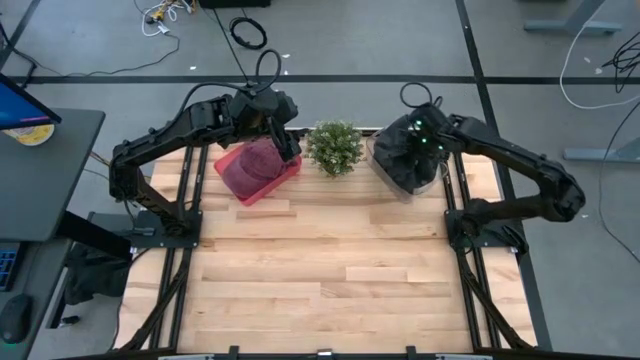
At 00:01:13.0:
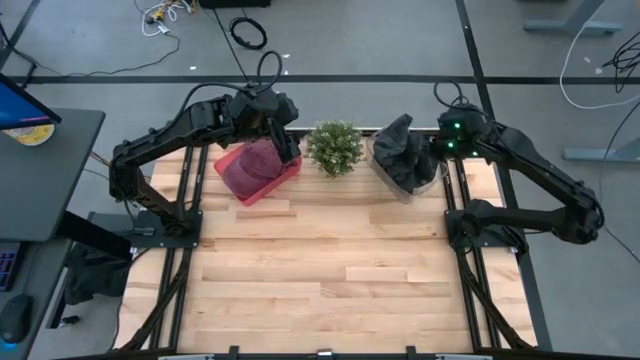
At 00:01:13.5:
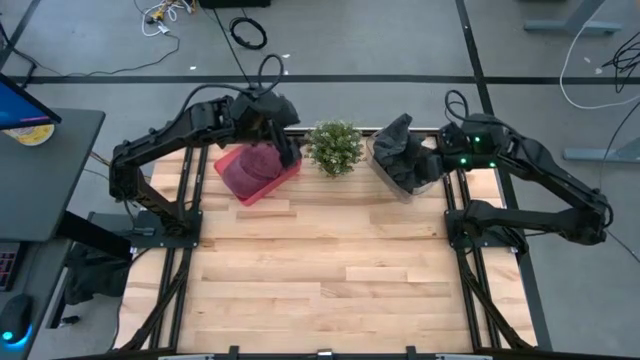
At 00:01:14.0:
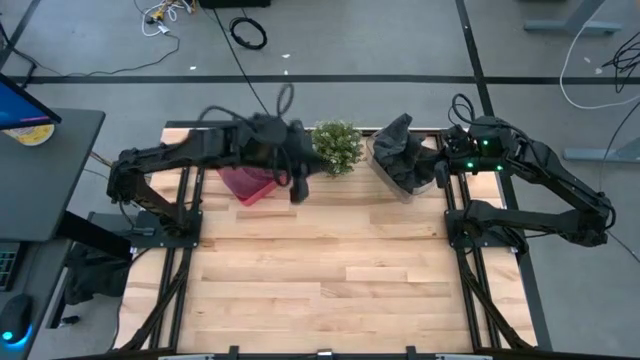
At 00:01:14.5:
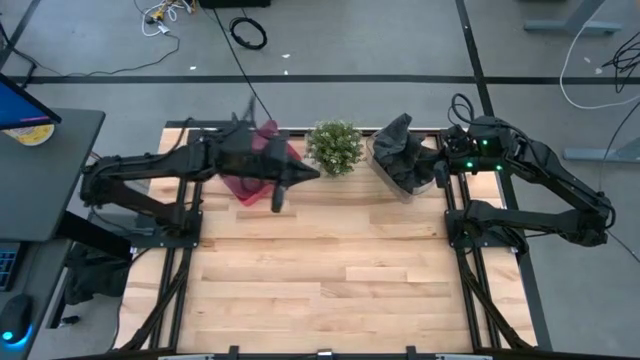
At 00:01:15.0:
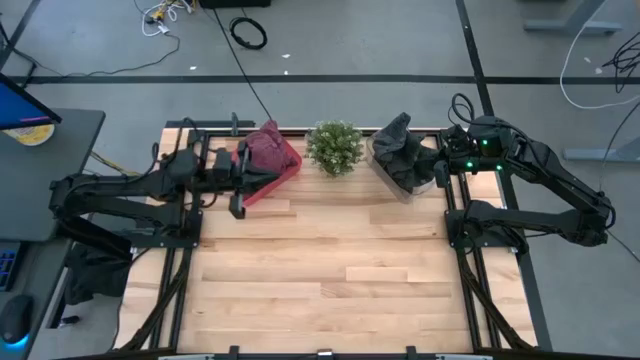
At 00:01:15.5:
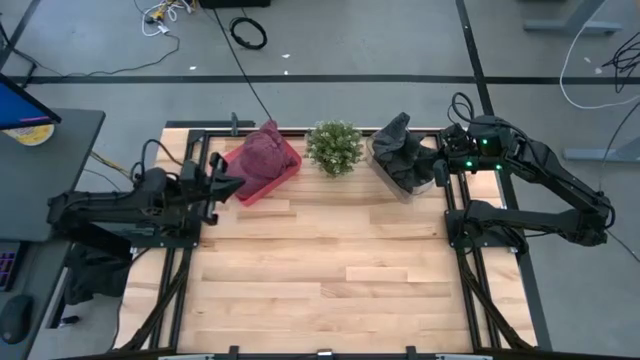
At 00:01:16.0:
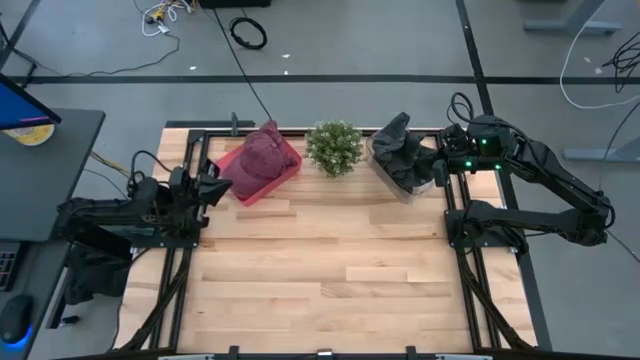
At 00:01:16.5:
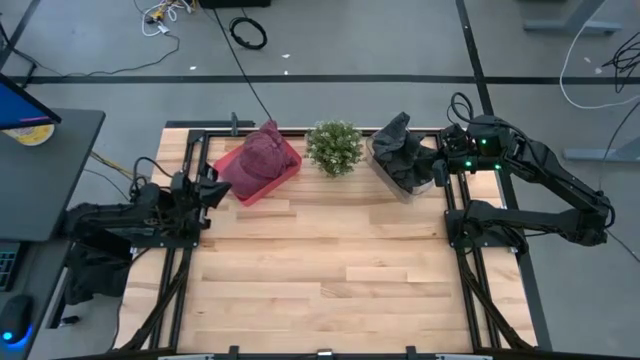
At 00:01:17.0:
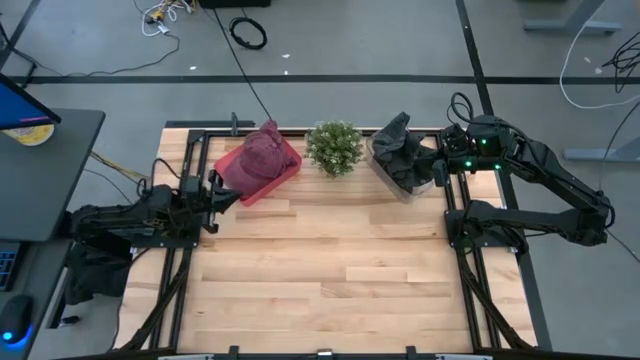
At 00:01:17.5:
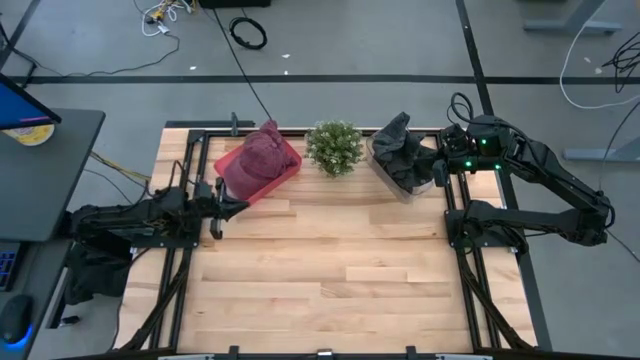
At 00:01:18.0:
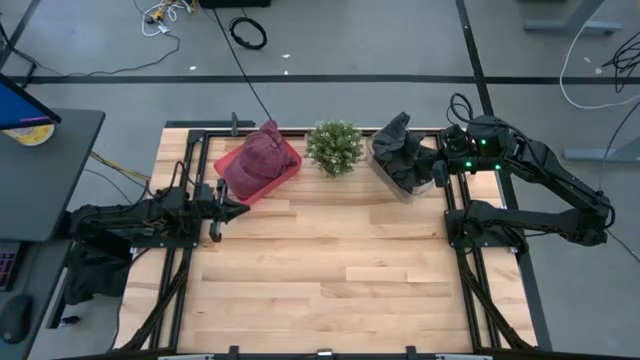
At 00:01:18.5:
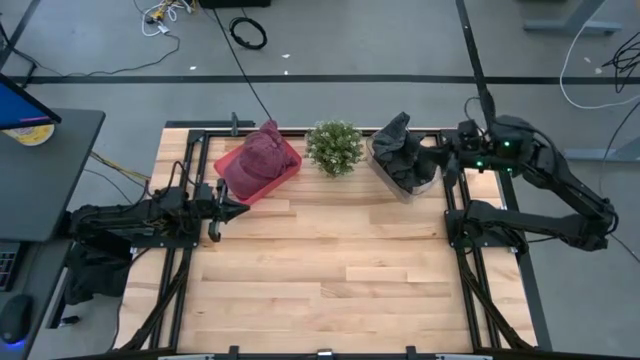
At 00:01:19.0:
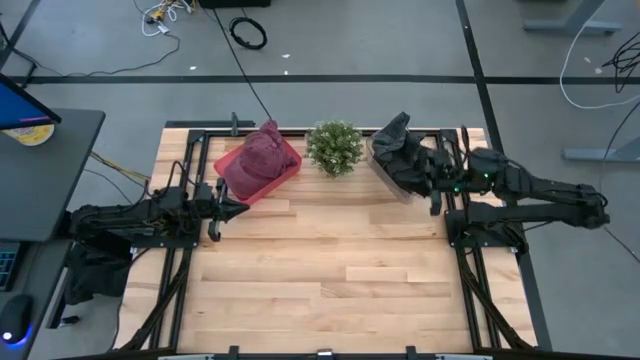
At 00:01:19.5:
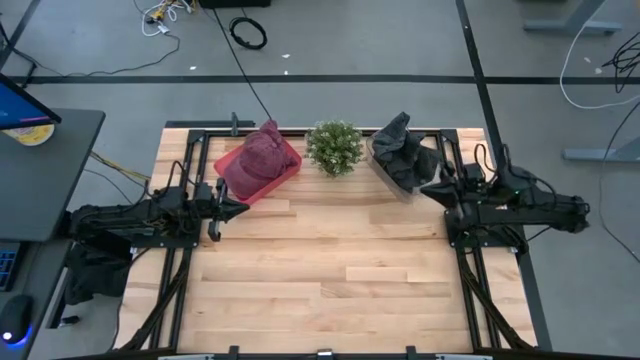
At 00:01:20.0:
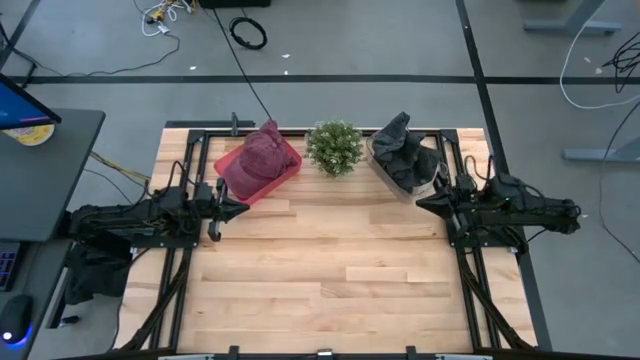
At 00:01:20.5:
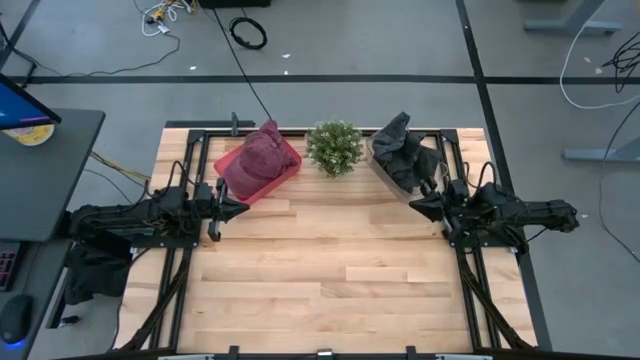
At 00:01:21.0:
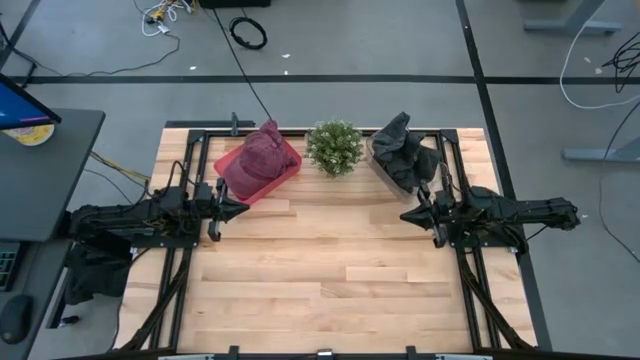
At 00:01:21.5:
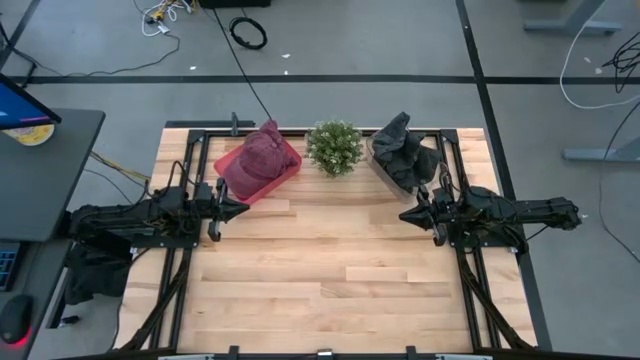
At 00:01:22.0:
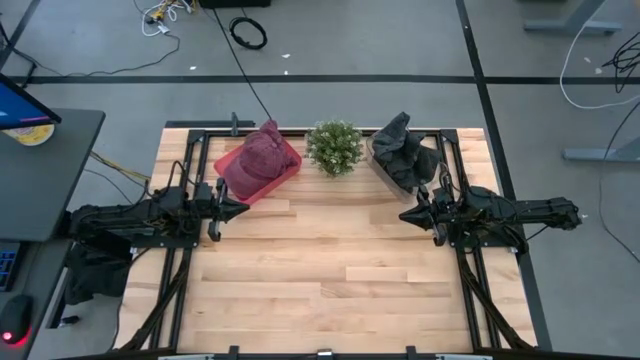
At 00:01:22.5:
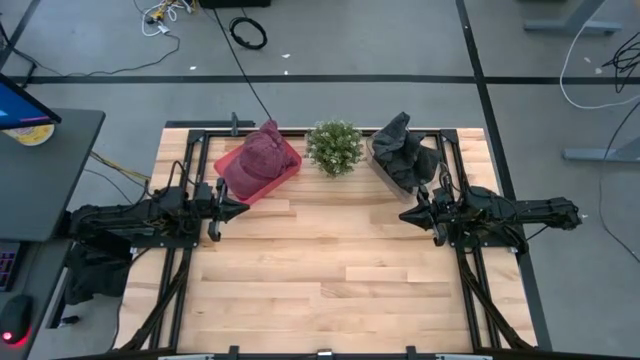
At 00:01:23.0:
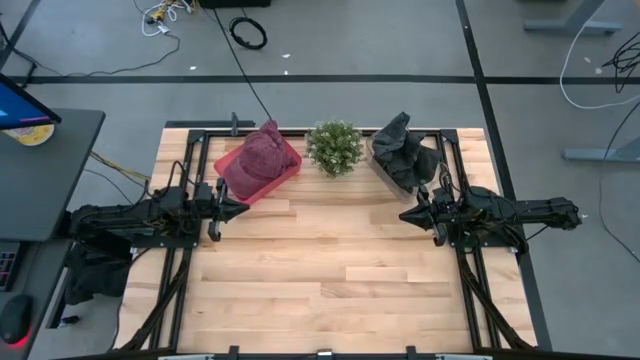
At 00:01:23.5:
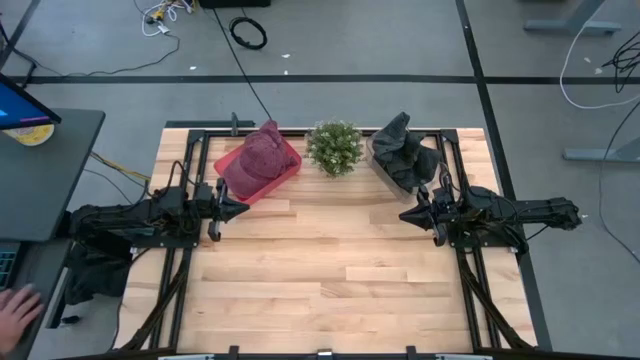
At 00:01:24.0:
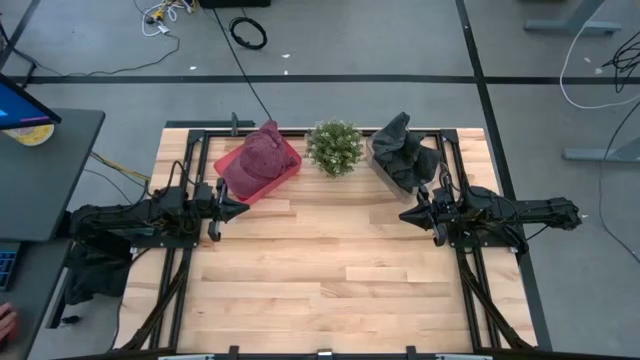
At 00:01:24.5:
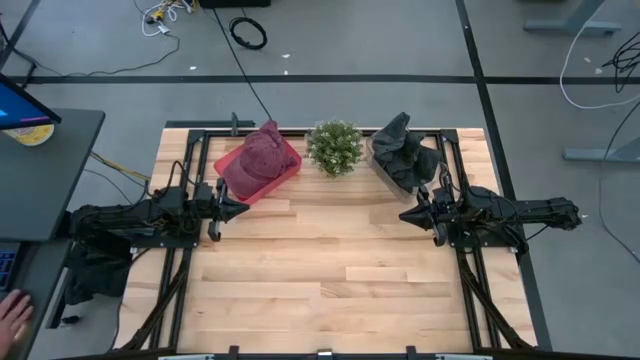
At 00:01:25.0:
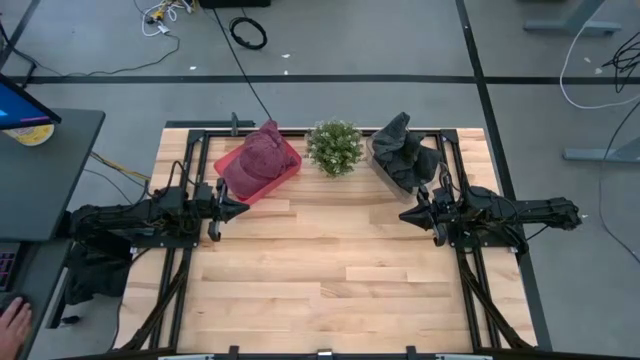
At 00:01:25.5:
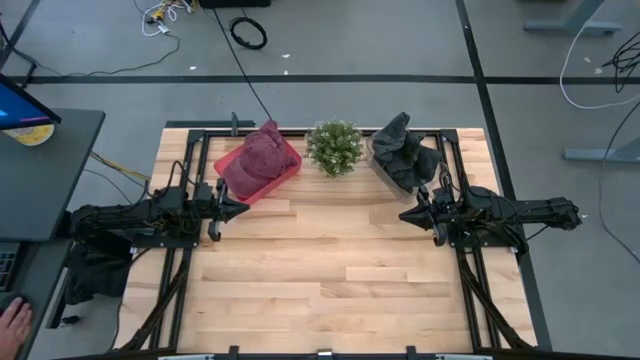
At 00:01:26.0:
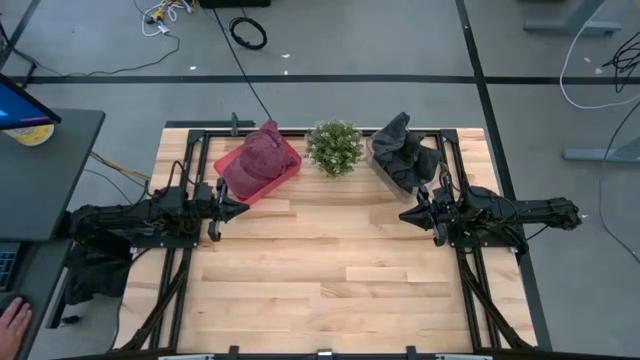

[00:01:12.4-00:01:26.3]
Task: Pick & Place hat
Return to Home Position

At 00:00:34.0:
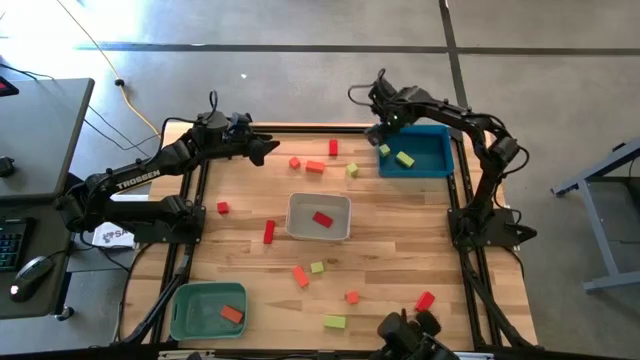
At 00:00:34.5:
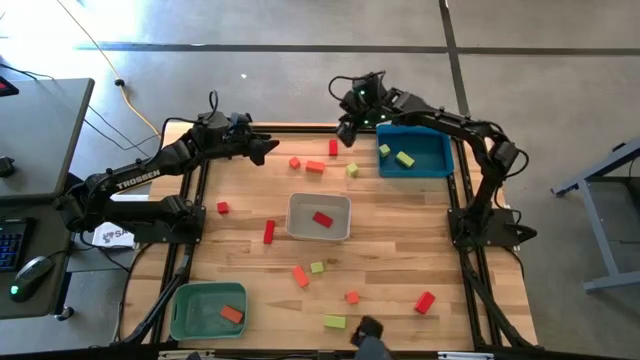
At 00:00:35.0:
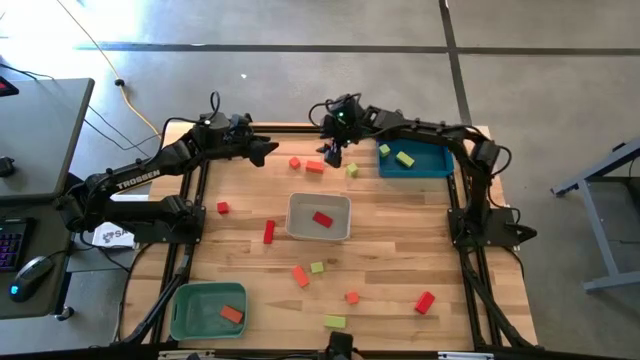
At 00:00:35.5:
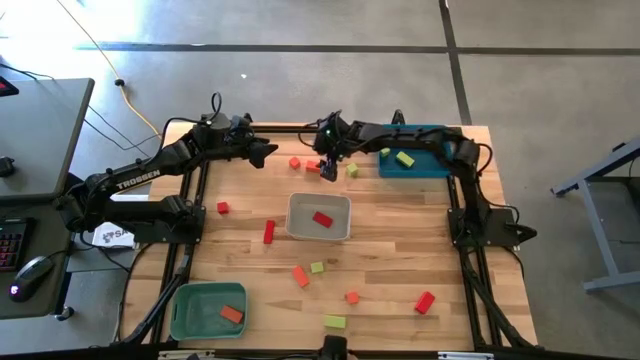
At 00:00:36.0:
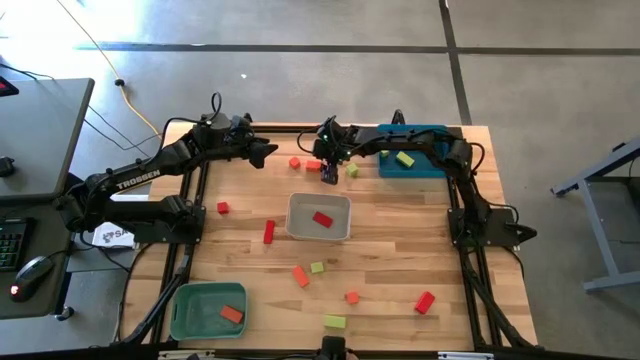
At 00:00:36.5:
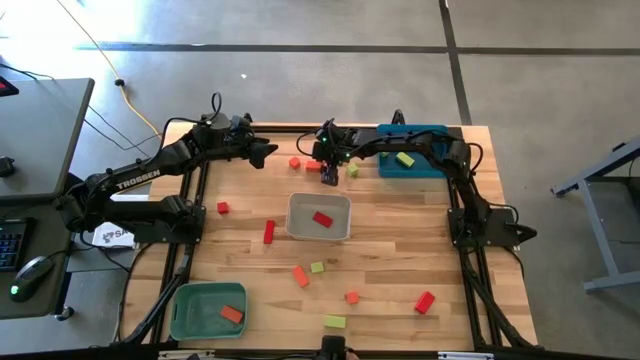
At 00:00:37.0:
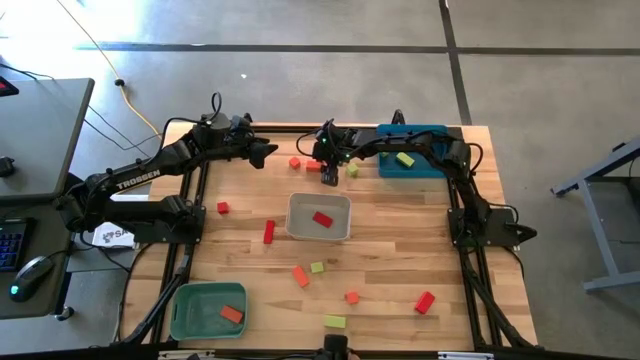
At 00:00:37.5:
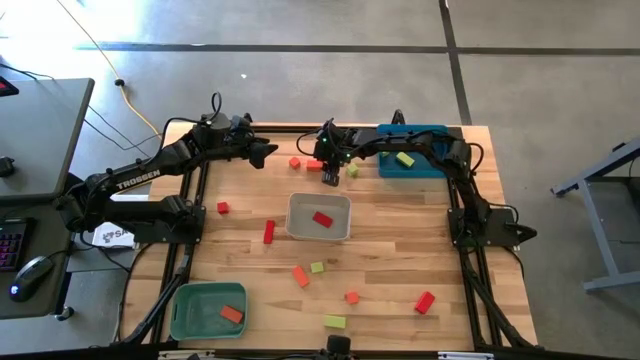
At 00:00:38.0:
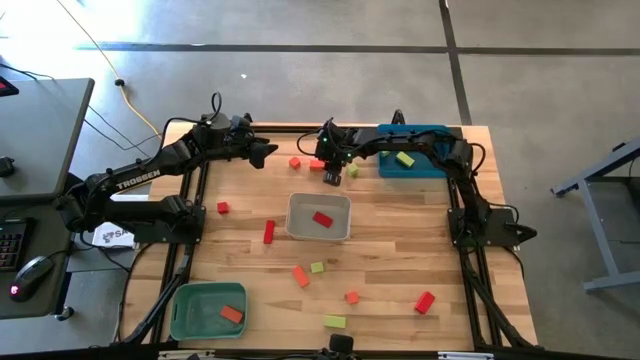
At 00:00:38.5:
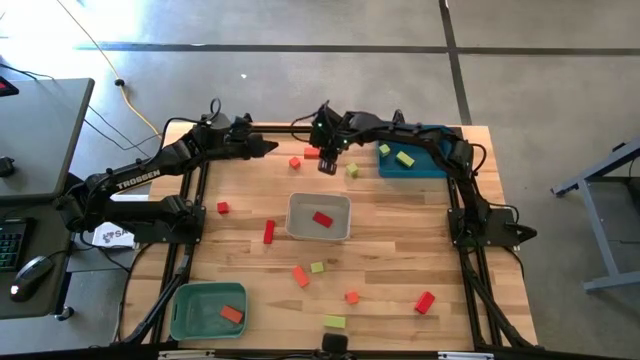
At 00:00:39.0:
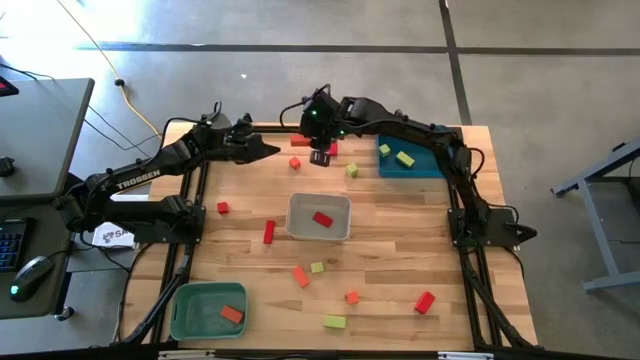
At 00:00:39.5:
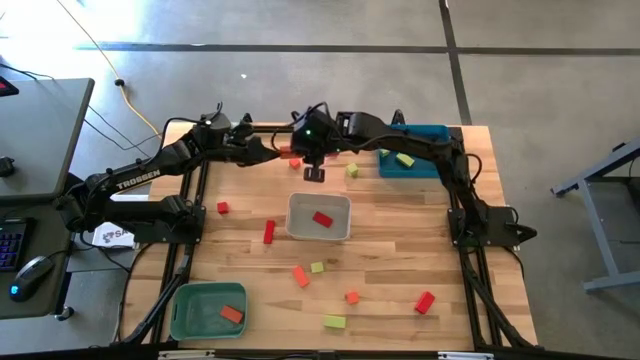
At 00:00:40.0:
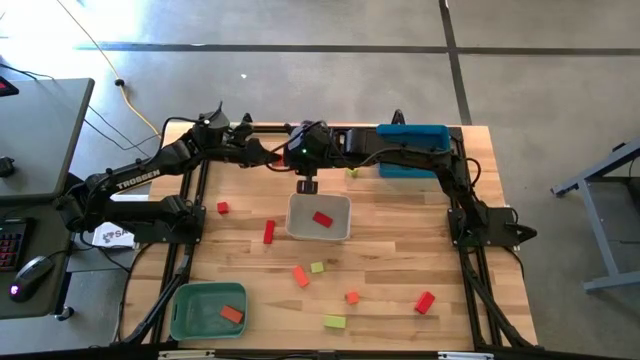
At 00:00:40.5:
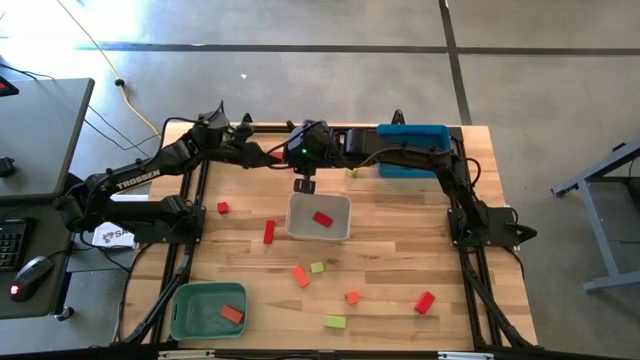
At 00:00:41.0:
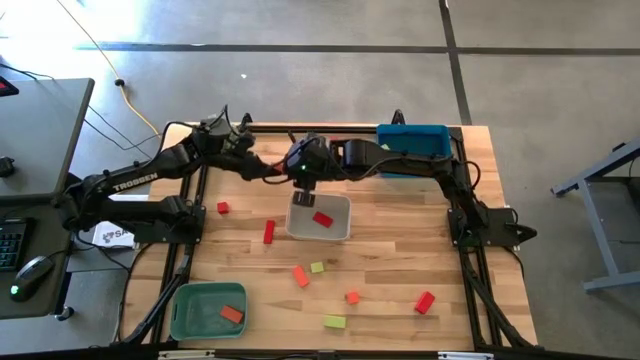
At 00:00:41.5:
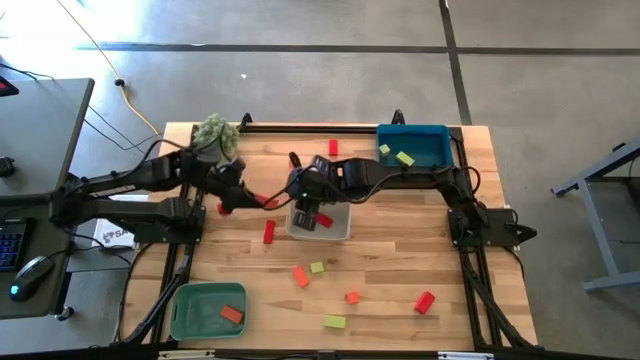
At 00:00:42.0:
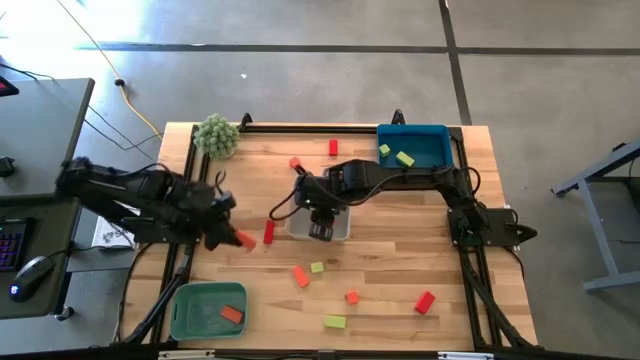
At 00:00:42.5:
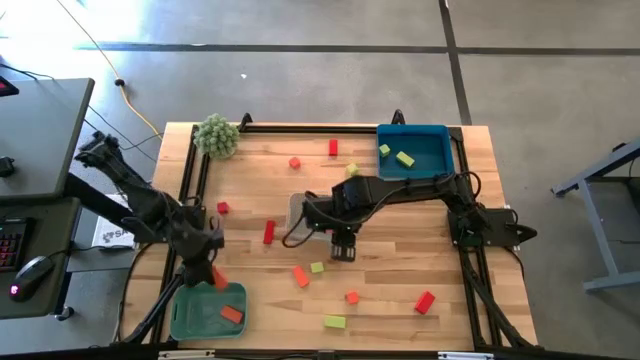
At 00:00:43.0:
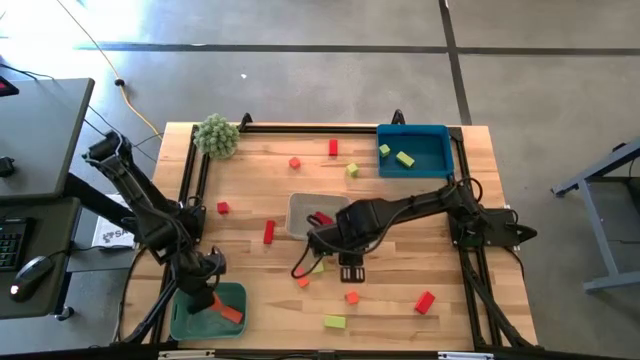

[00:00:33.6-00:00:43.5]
Task: Sort & place blocks by color
Put the orange wooden block into the green bin
